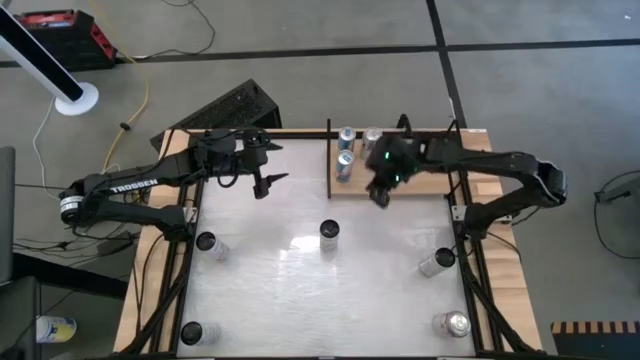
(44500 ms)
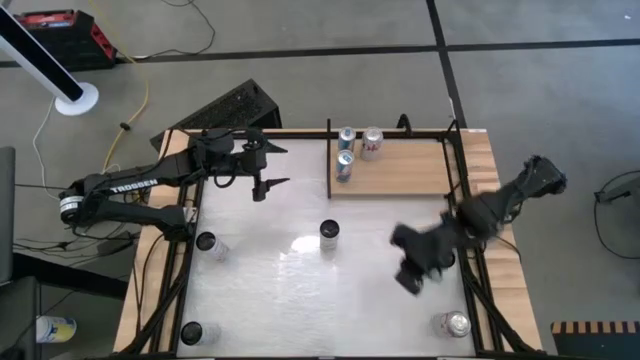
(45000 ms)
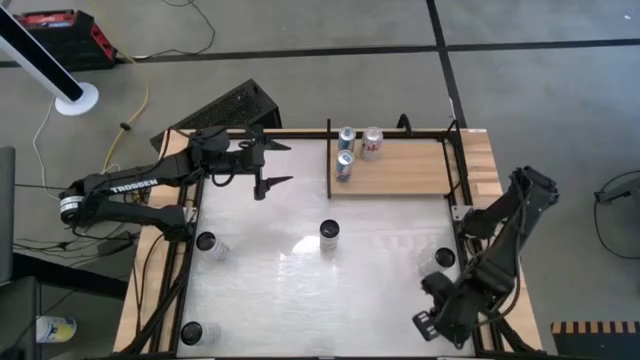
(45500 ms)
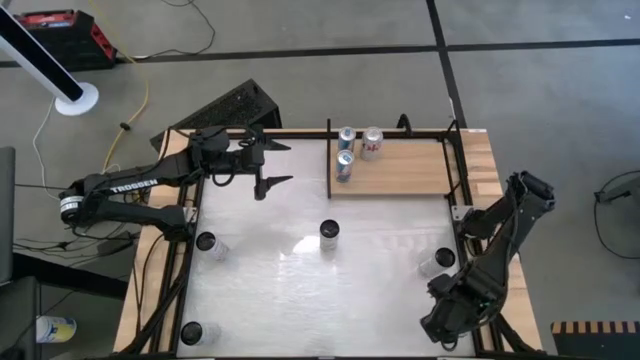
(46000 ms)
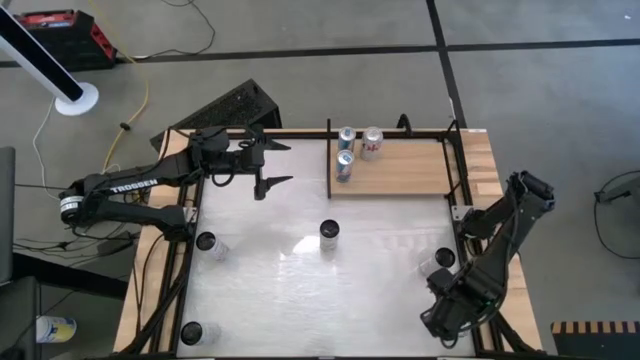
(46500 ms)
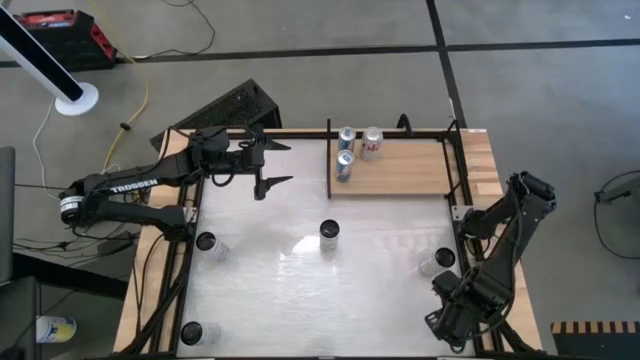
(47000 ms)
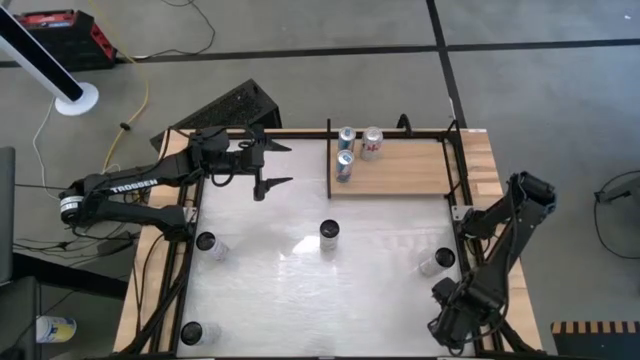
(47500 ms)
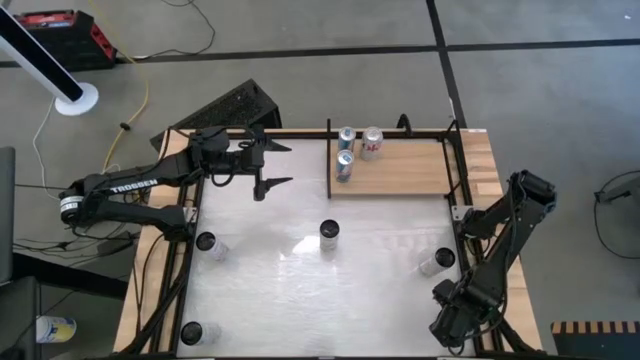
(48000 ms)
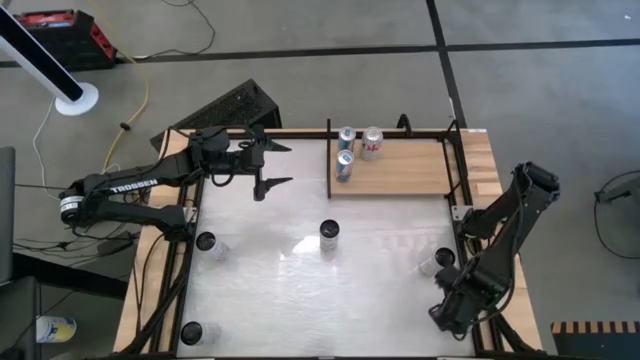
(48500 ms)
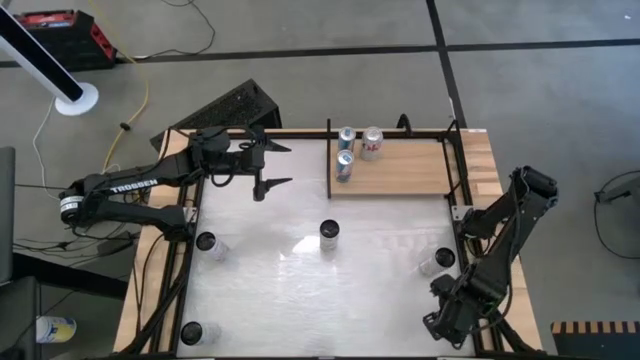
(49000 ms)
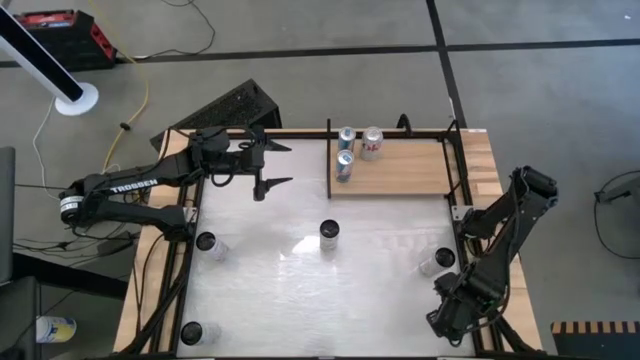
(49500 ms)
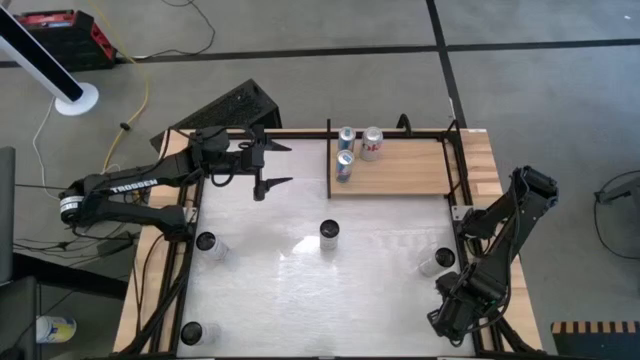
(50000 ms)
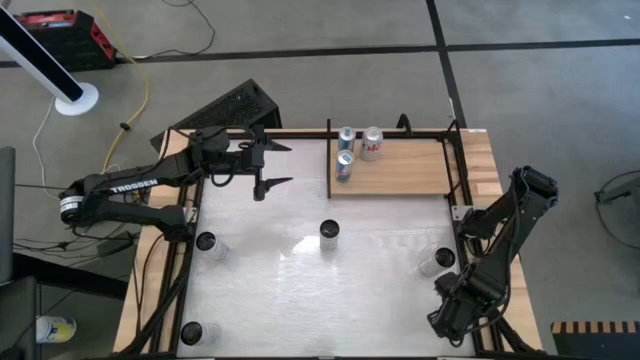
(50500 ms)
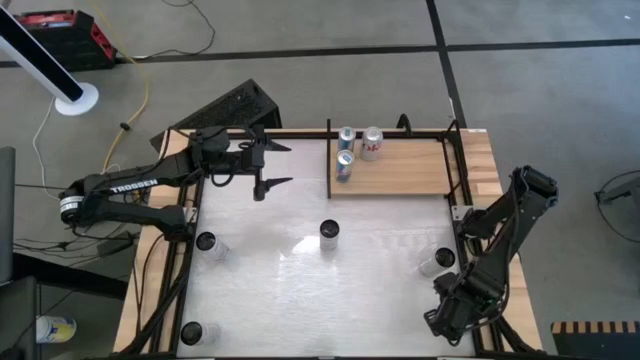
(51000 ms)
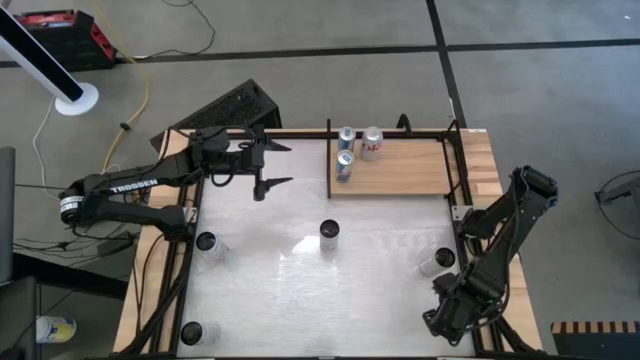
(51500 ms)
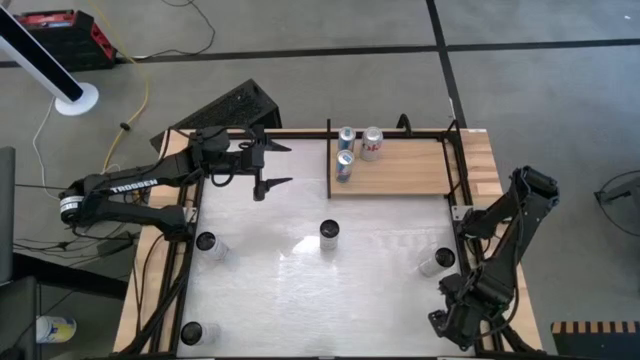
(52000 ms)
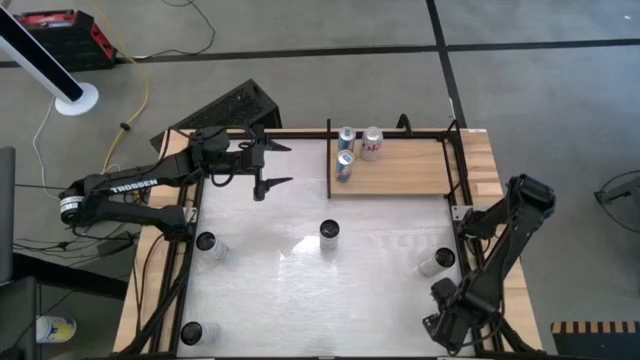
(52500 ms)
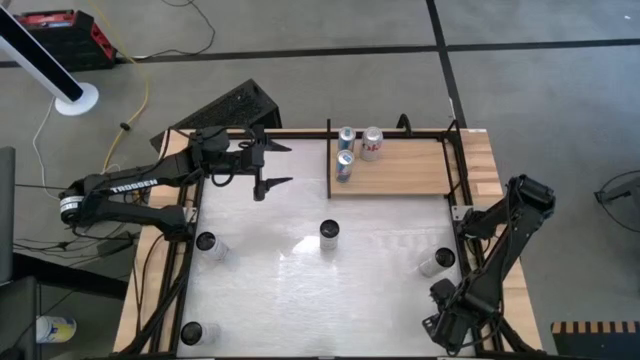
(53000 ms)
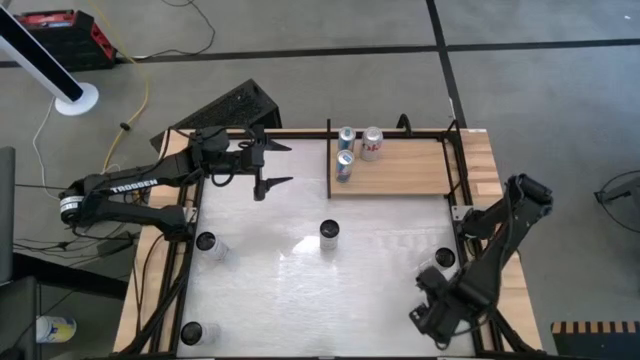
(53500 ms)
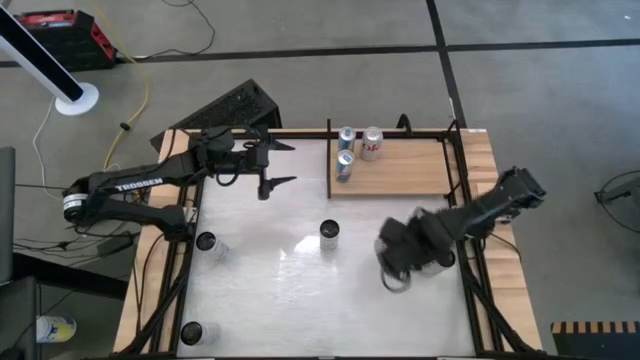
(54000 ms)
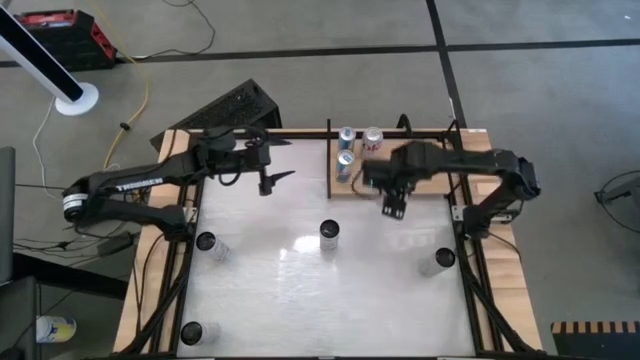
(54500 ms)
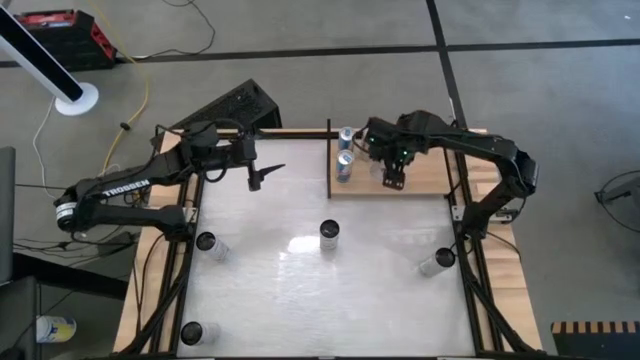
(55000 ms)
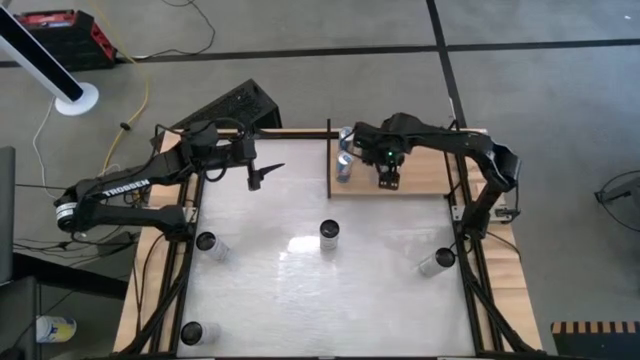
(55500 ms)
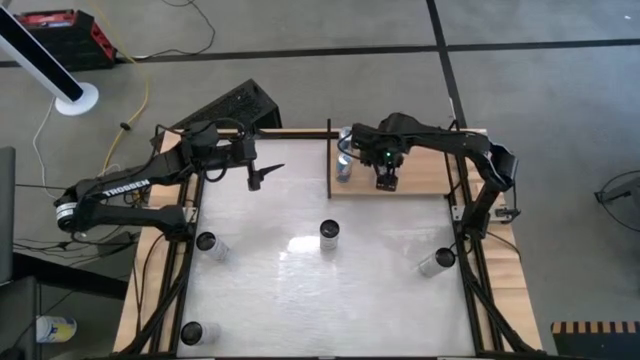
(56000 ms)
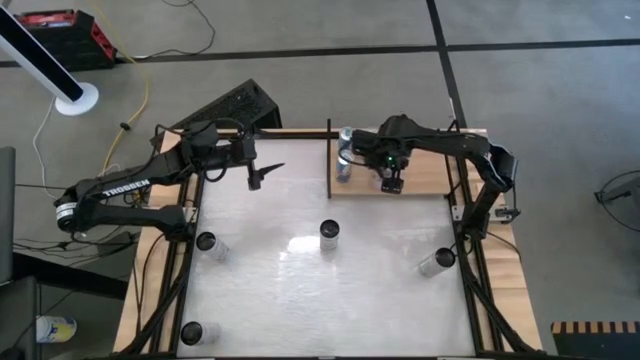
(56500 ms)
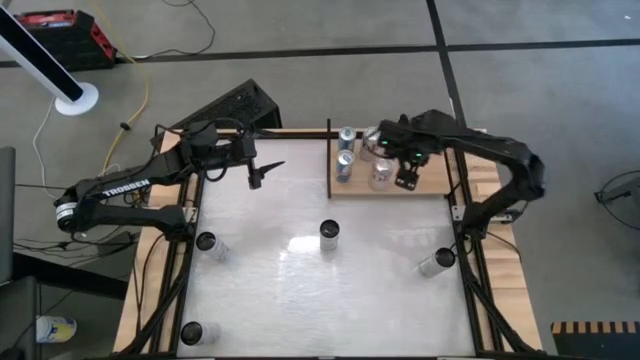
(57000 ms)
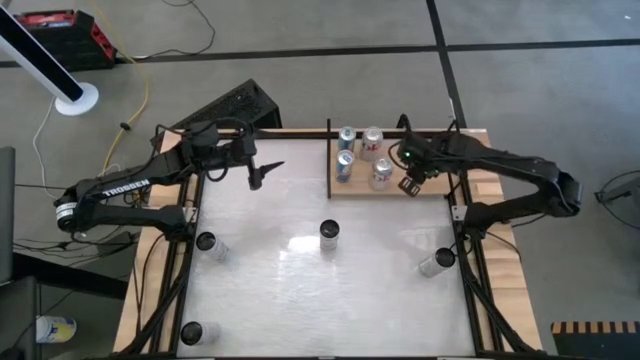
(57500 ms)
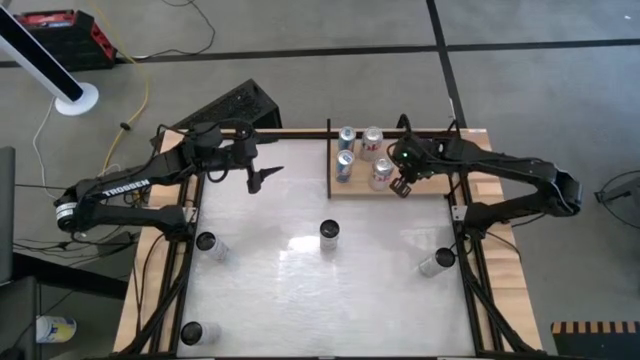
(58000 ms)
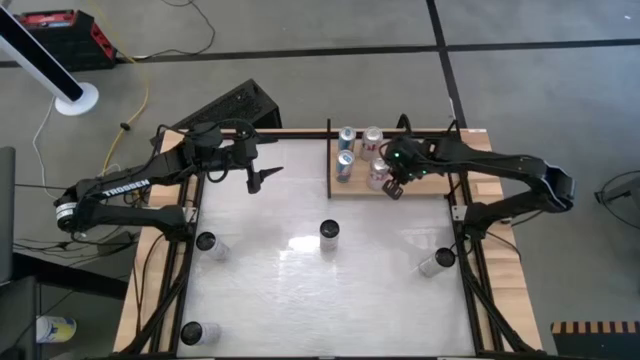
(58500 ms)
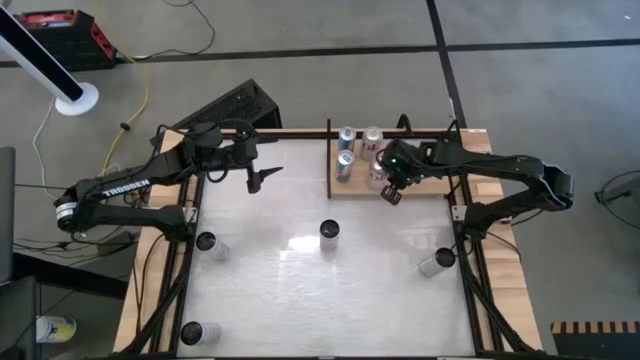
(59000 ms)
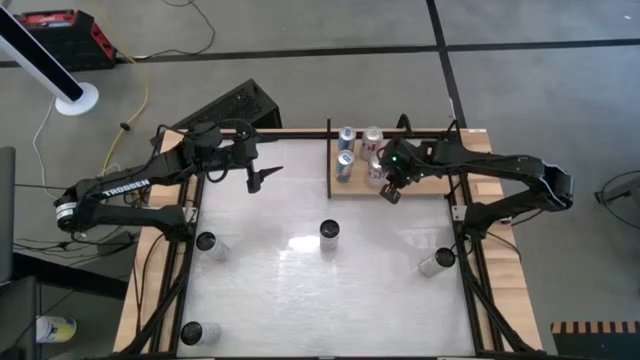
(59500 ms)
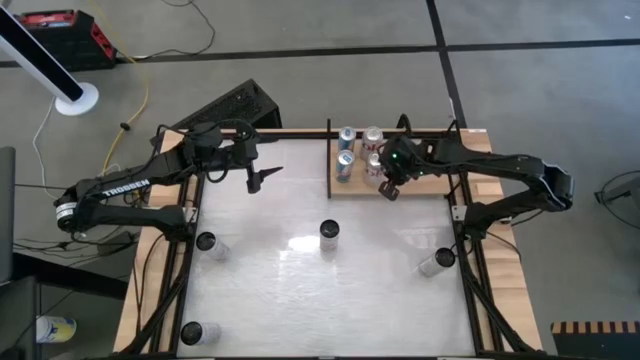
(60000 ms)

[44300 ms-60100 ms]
Task: Place canned beverage on shelf
Put the red-silver soda can on the shelf aligned with the other red-silver soda can

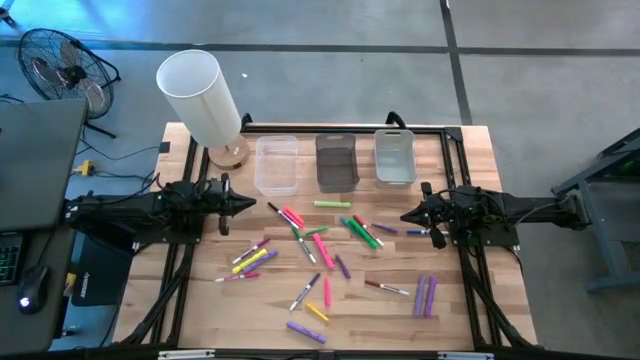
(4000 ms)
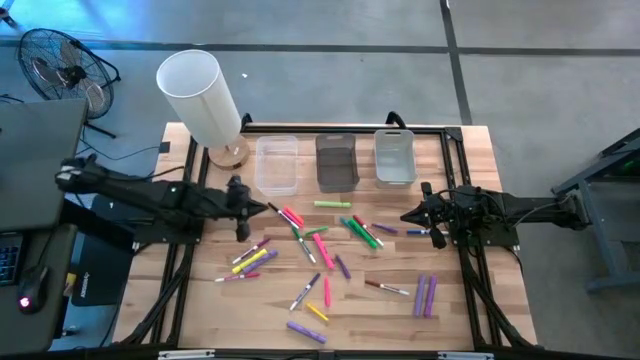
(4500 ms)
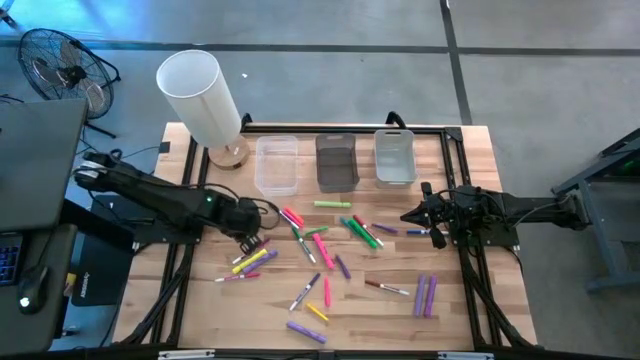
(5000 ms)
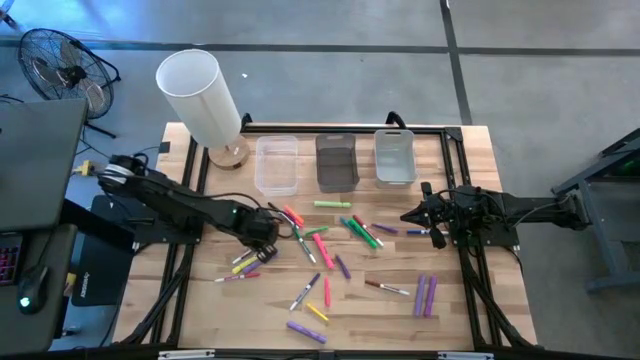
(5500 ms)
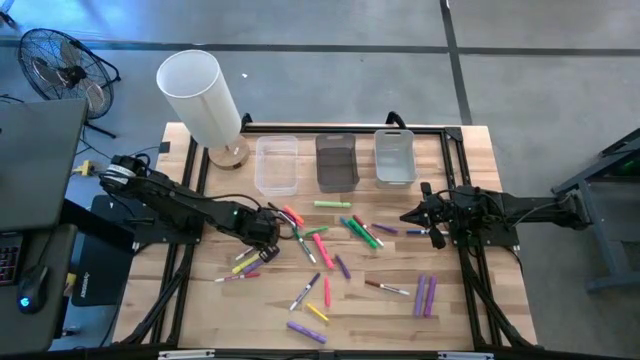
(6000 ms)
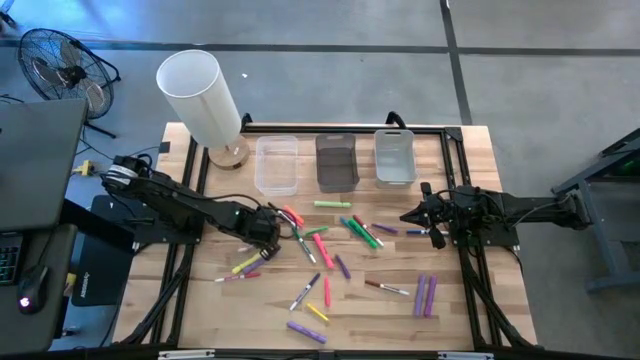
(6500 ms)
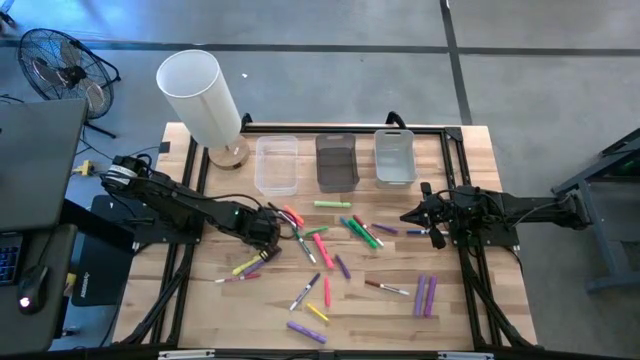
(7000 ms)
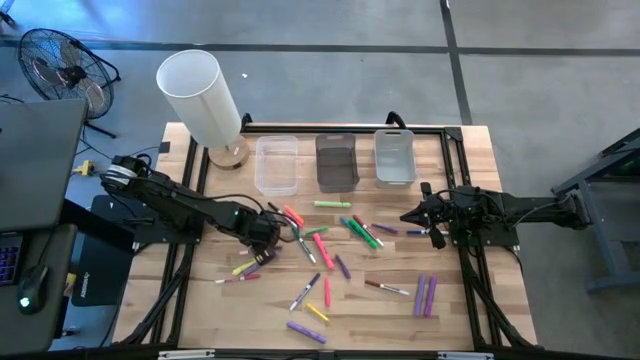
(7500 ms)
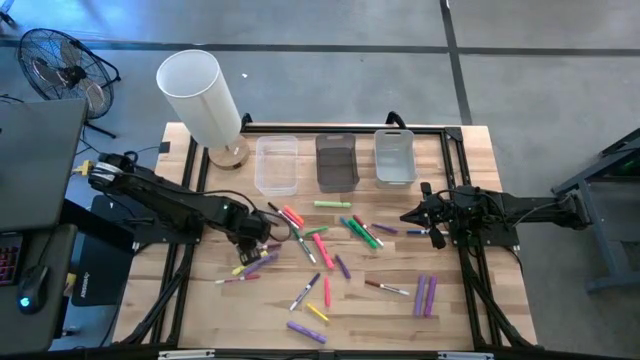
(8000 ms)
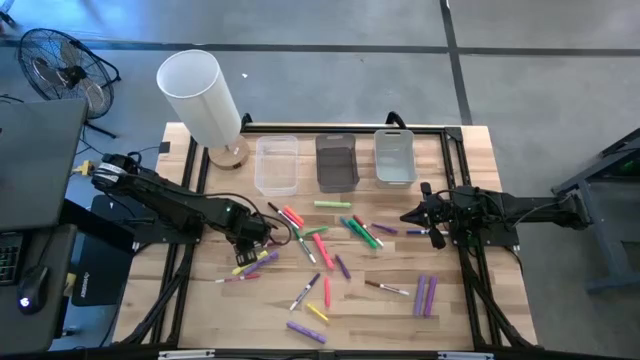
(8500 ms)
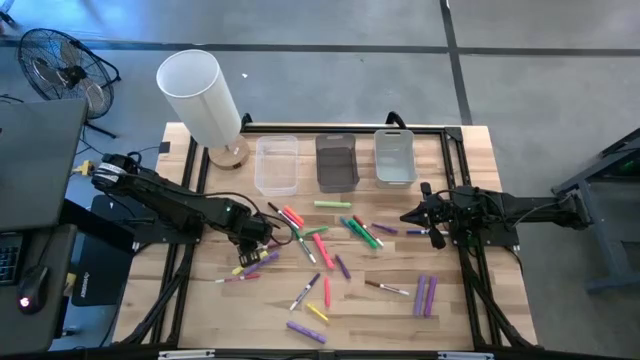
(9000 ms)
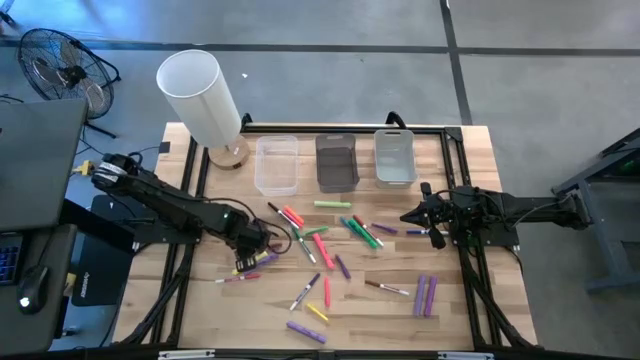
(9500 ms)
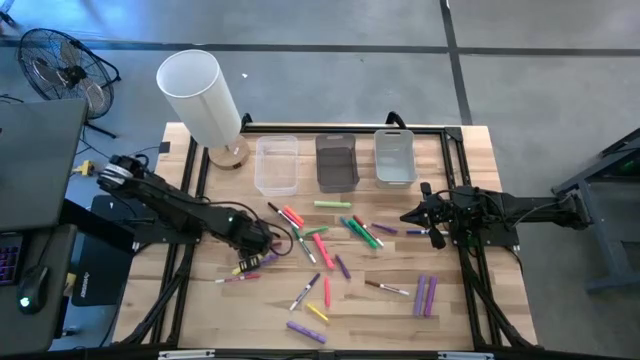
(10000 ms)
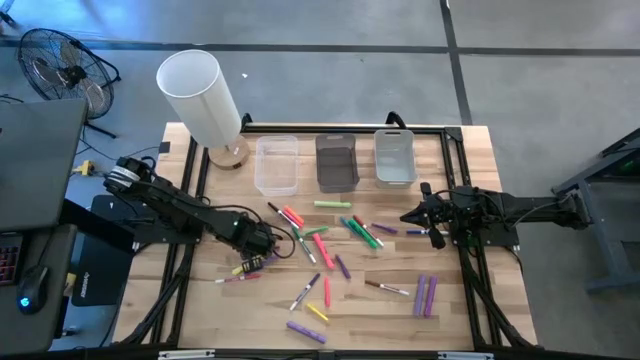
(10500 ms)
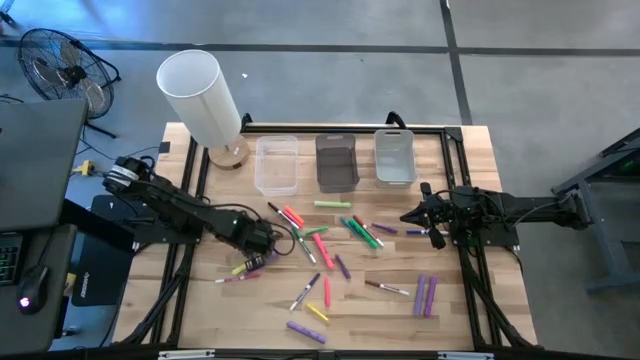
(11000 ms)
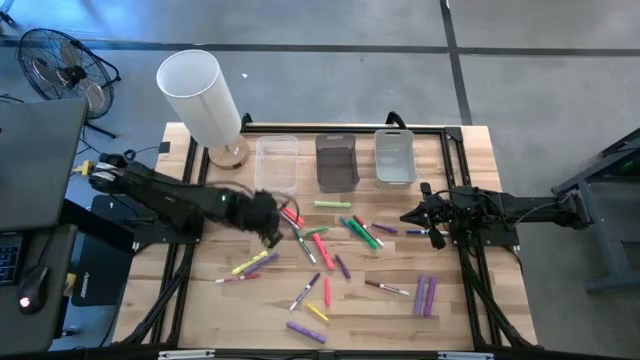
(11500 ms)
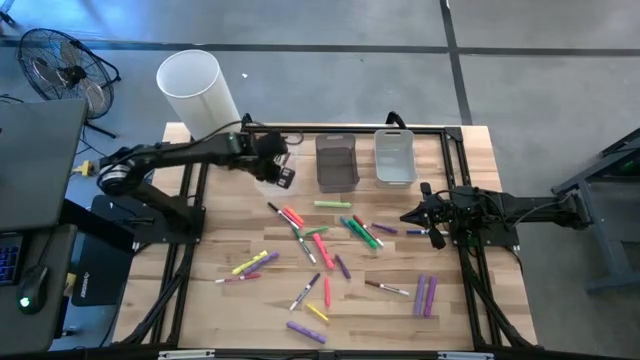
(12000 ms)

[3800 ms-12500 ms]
Task: Pick & Place Markers
Put the purple dry erase marker into the transparent bin
